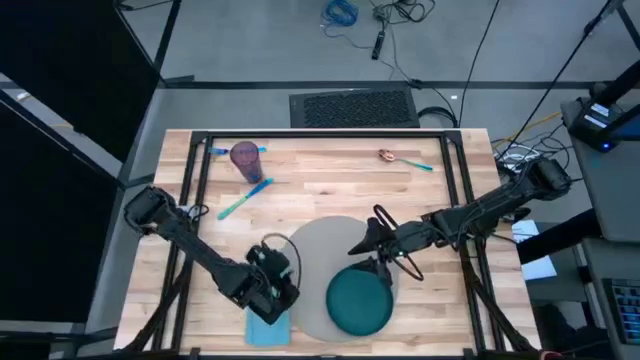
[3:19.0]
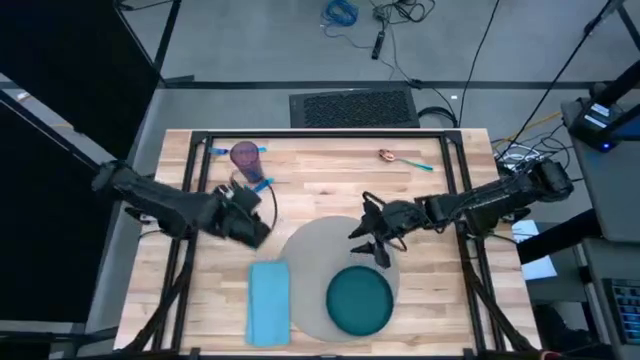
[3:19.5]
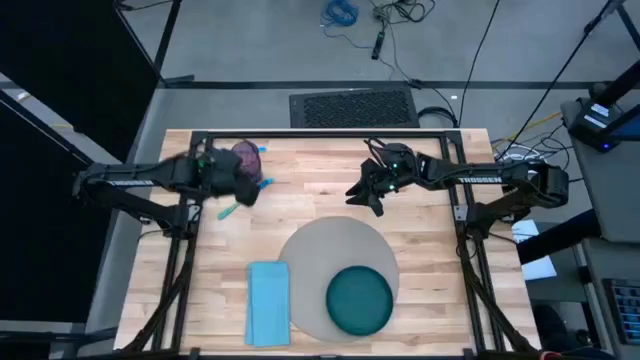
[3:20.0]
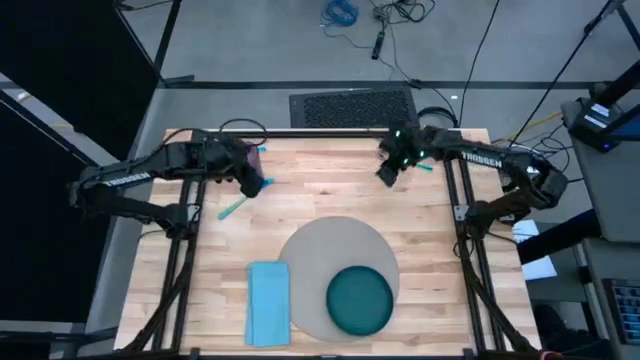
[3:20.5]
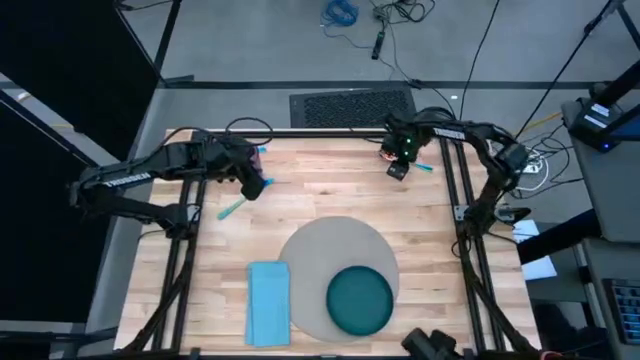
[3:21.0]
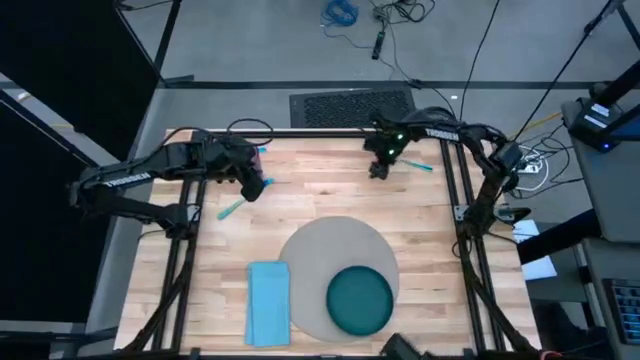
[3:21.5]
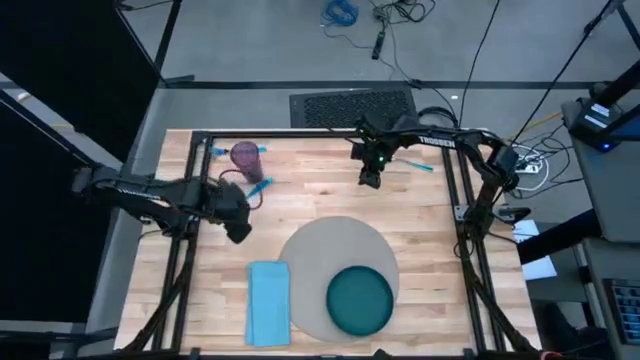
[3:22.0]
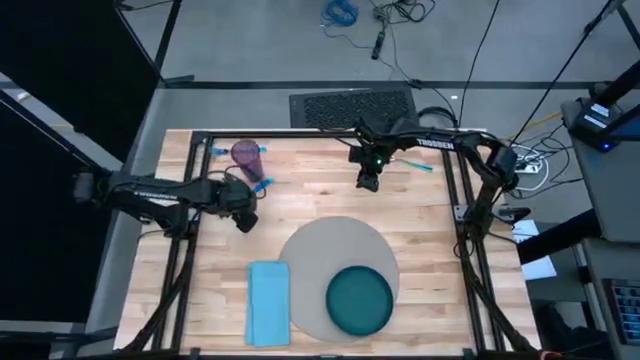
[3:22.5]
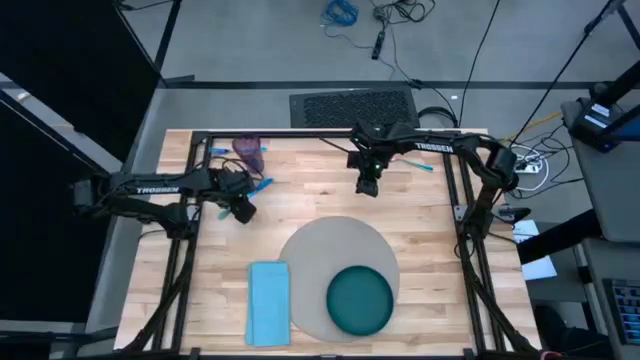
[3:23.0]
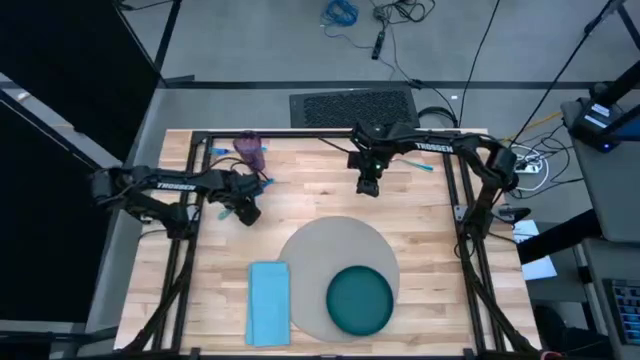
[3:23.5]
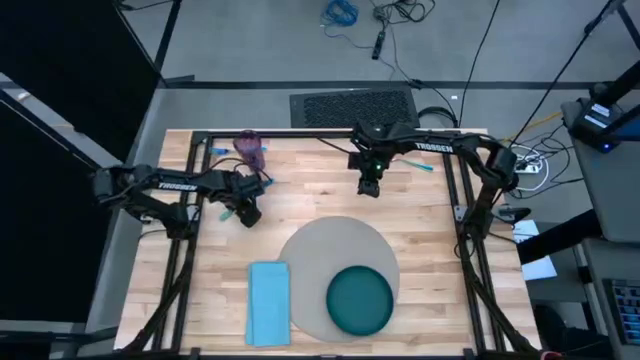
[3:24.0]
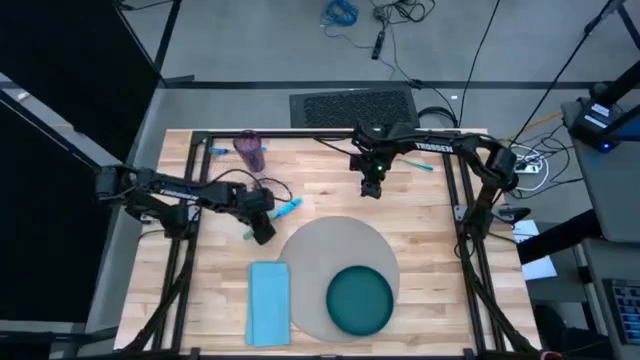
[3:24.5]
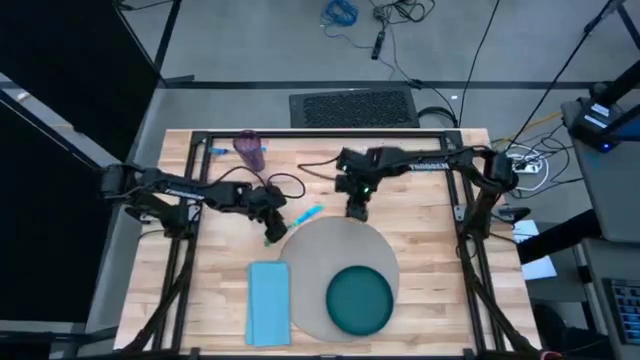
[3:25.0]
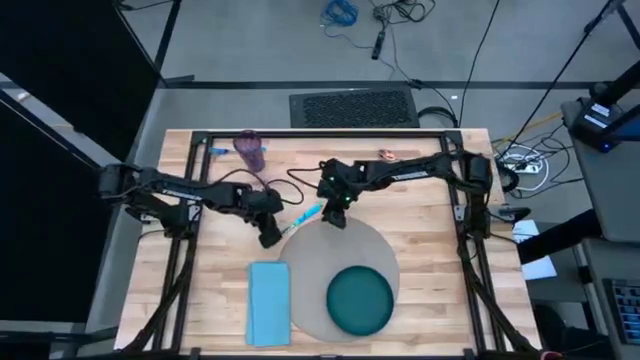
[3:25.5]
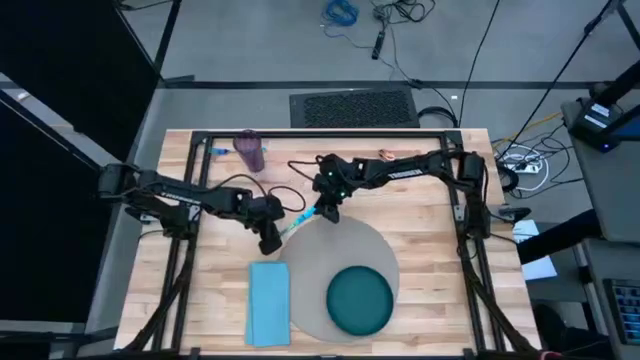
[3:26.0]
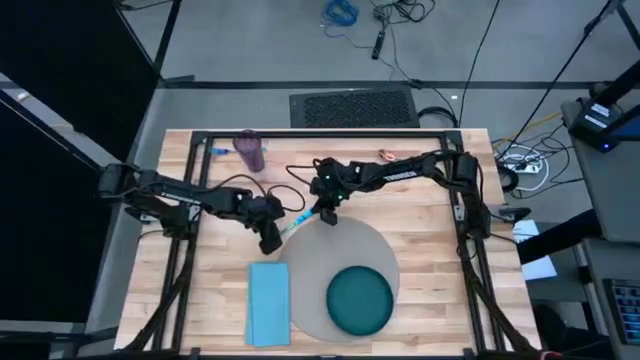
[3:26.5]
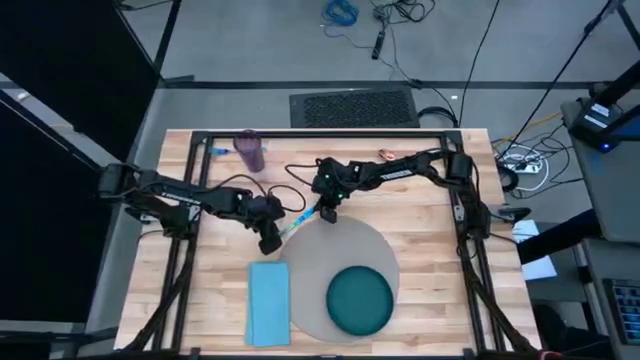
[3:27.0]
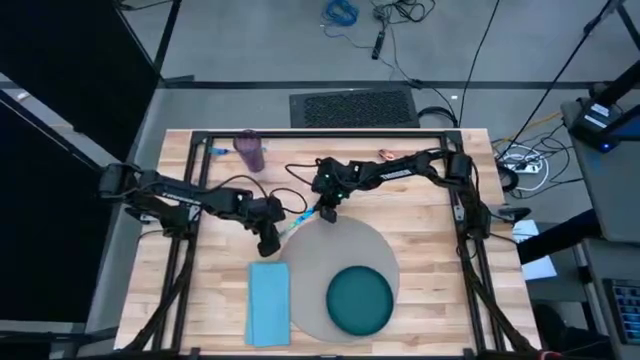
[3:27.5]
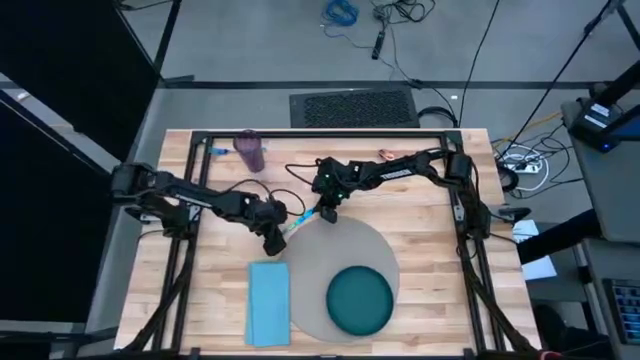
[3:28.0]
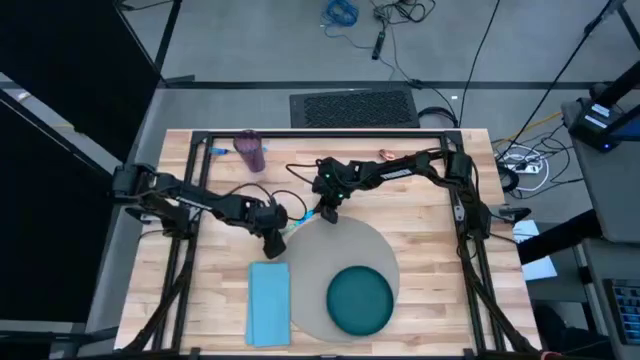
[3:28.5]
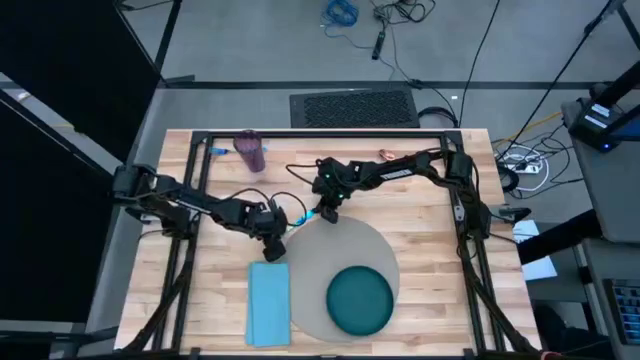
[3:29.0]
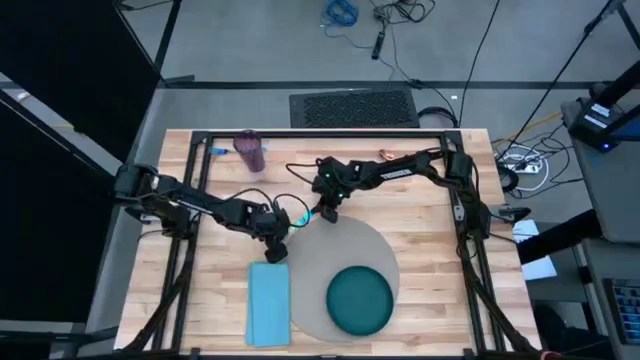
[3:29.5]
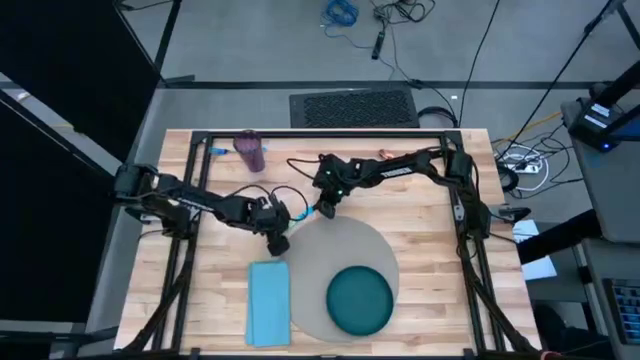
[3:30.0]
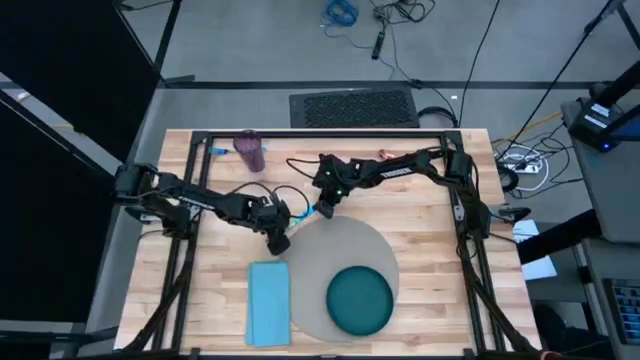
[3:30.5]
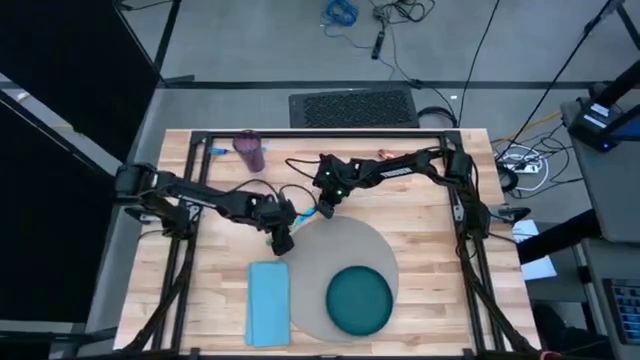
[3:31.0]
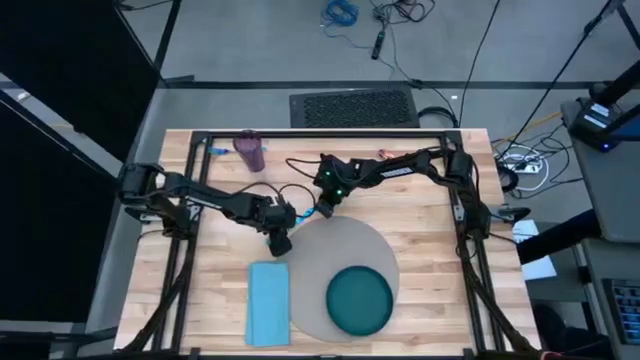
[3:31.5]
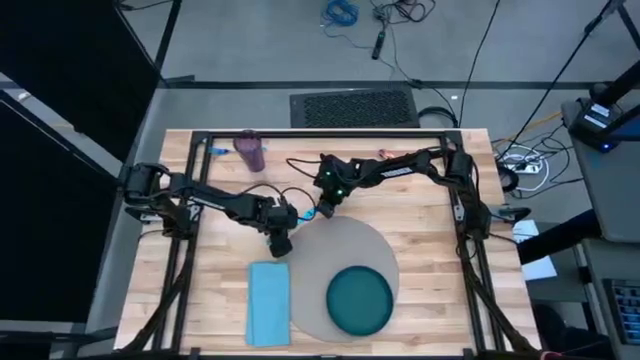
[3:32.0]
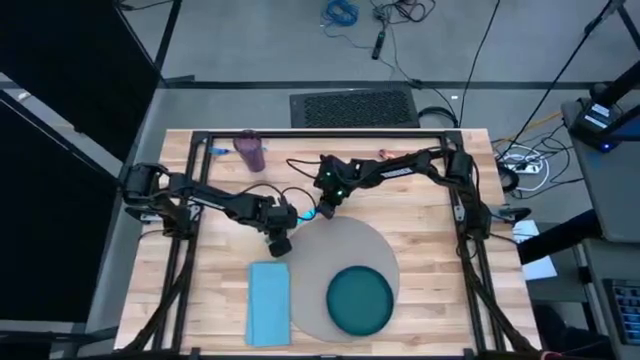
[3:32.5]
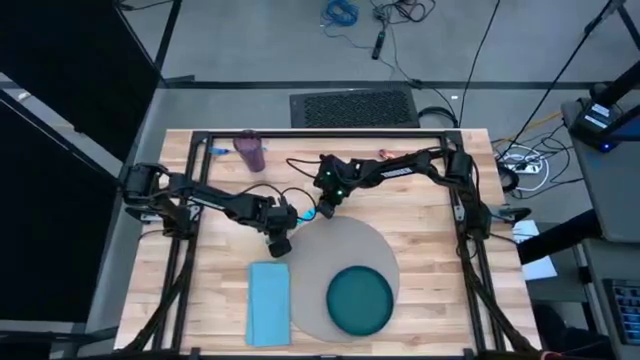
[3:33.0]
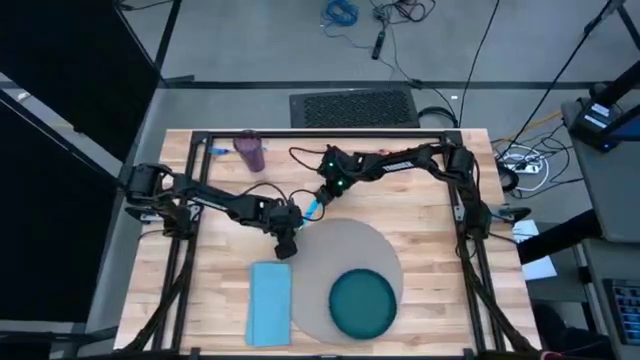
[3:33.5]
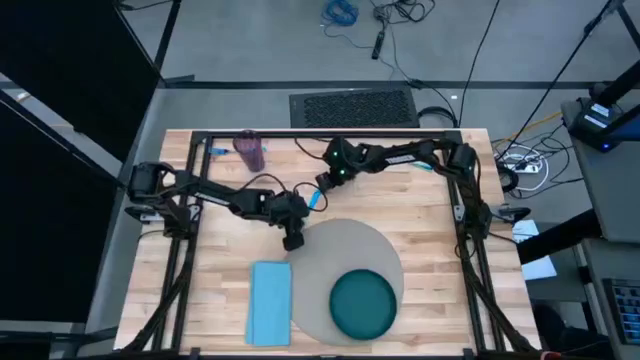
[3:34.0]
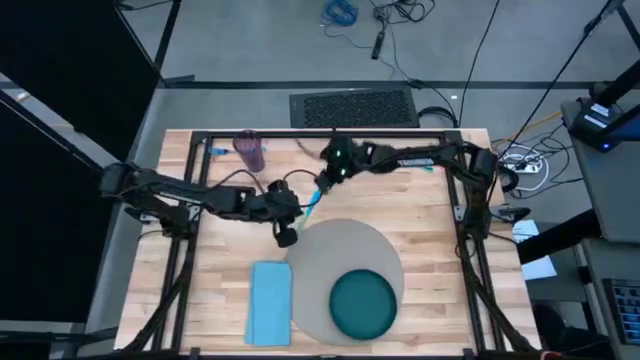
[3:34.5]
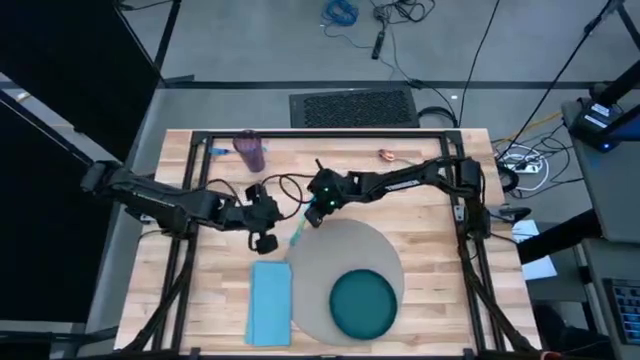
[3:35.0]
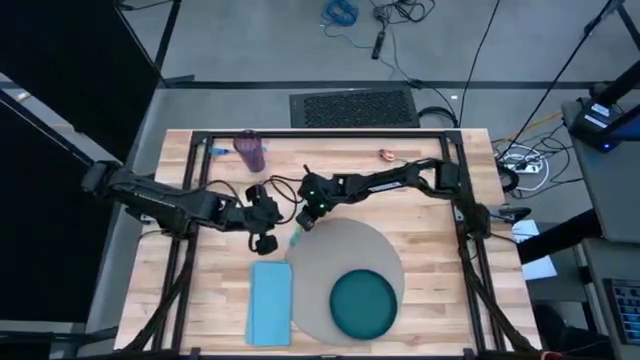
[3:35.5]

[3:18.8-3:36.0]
Task: Set table place
Move the iridescent knife to the bottom right of the table

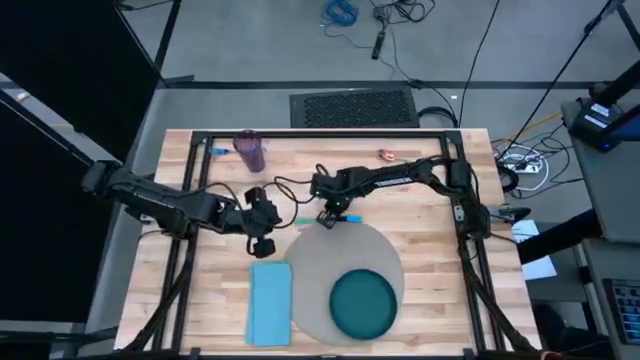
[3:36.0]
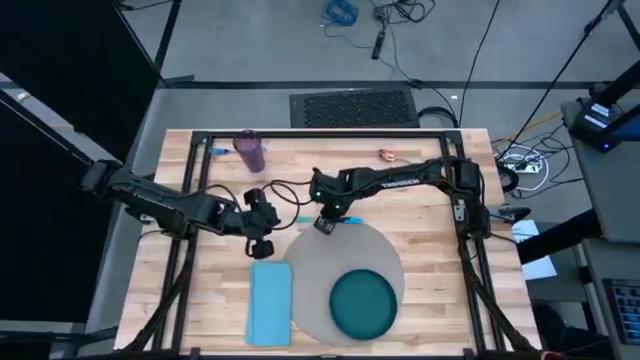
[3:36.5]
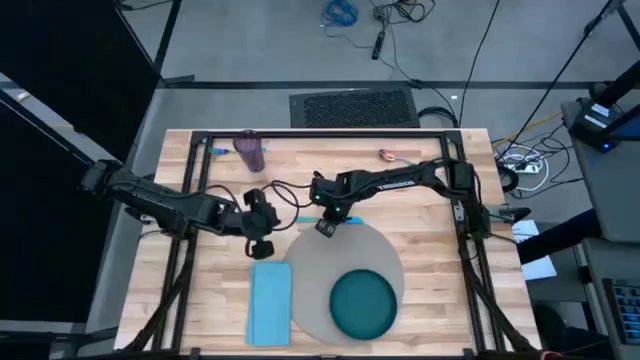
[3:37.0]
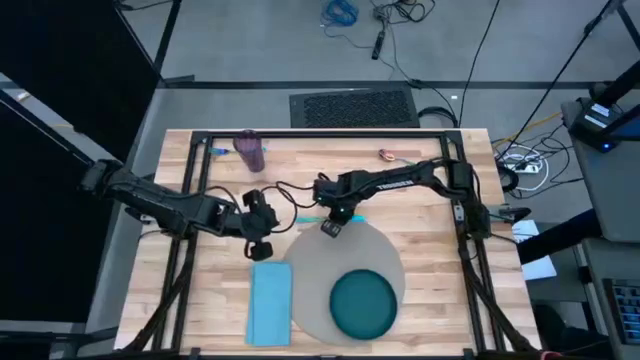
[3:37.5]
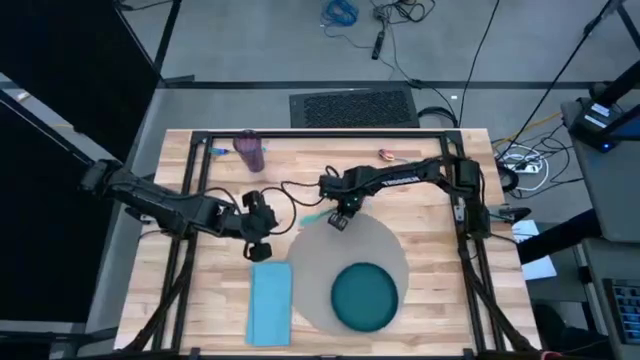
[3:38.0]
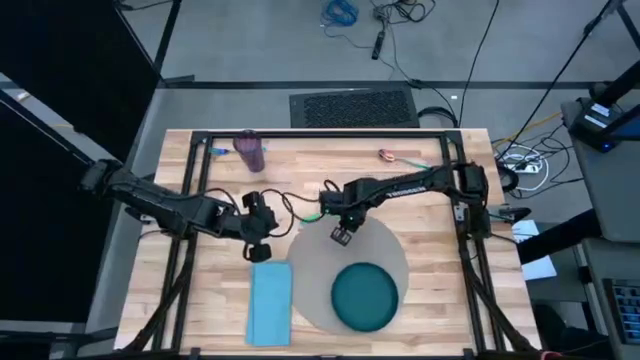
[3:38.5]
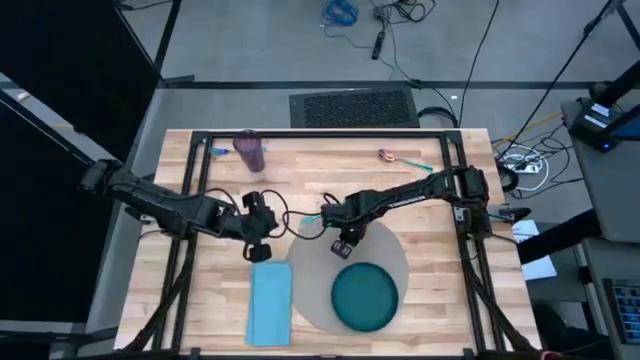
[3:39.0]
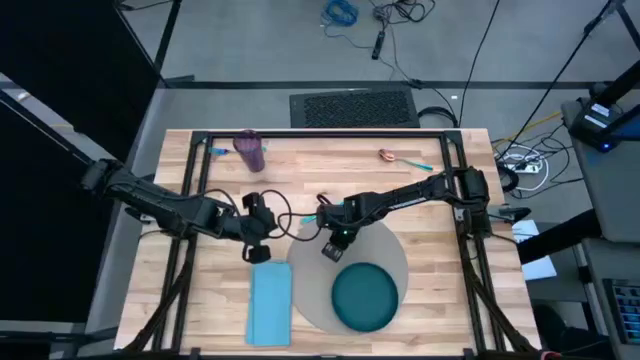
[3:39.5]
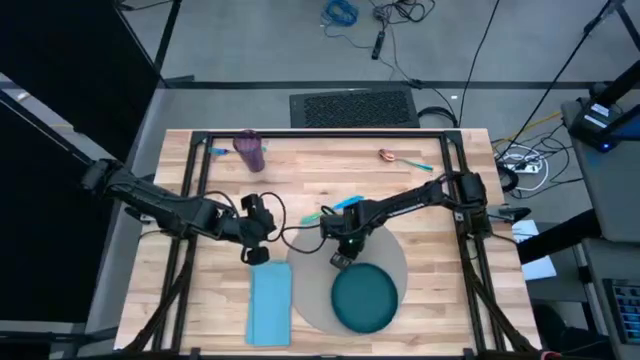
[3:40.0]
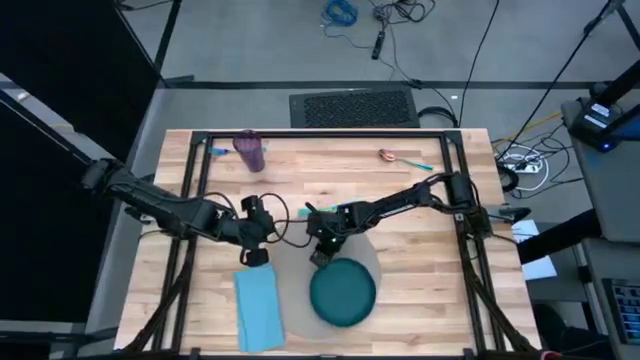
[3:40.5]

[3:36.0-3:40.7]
Adjust the gray mat
